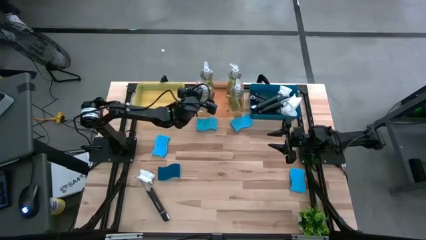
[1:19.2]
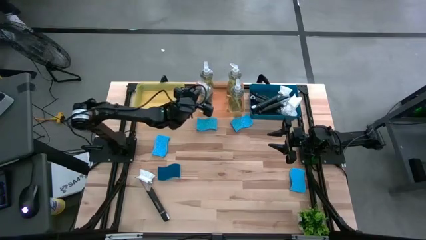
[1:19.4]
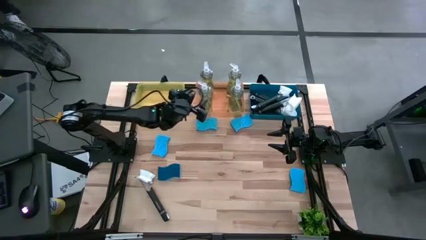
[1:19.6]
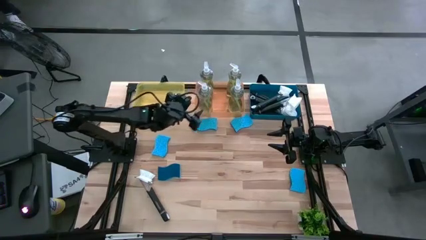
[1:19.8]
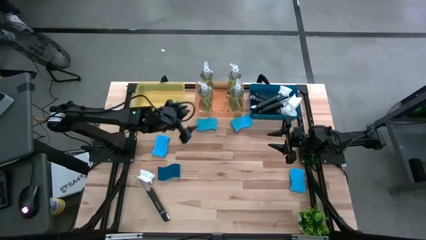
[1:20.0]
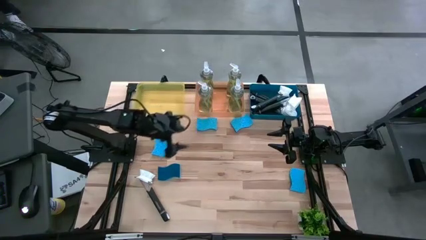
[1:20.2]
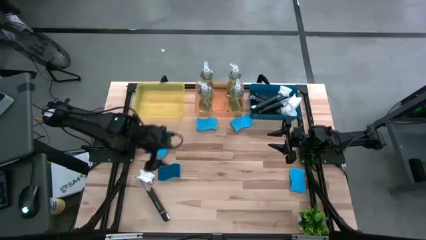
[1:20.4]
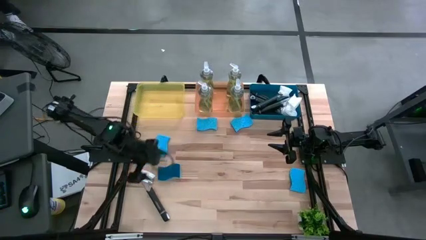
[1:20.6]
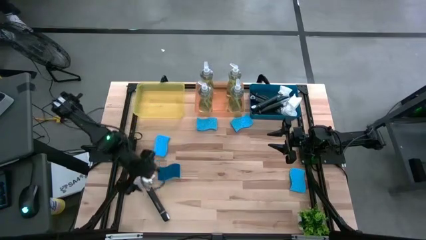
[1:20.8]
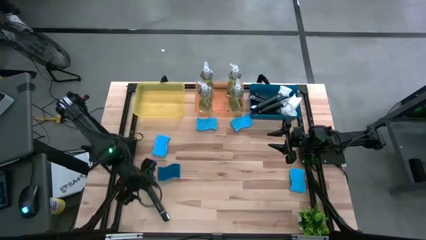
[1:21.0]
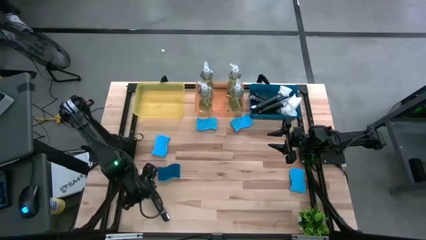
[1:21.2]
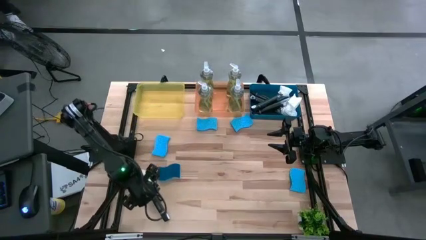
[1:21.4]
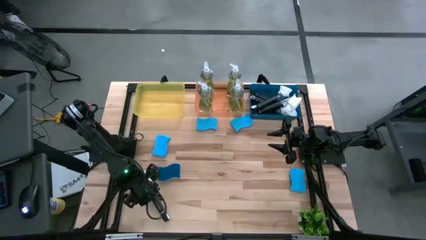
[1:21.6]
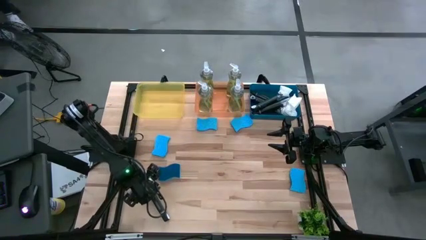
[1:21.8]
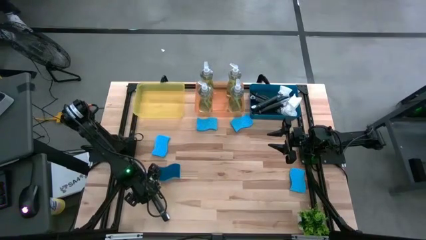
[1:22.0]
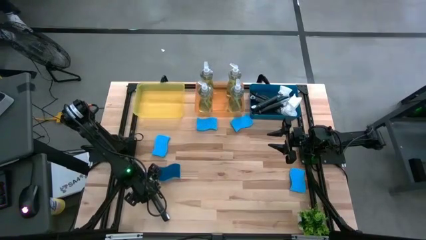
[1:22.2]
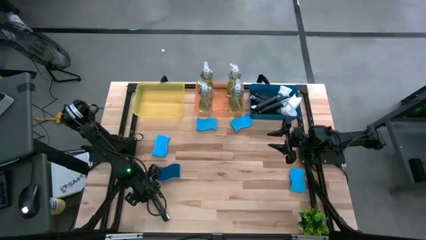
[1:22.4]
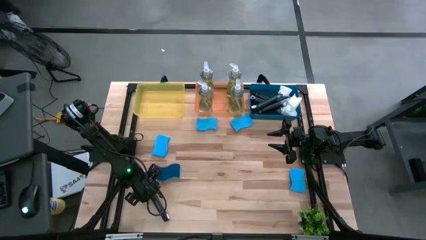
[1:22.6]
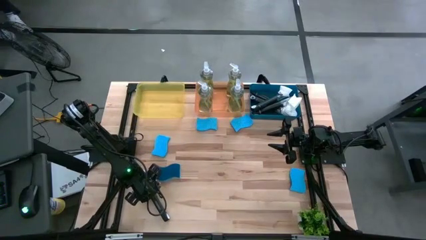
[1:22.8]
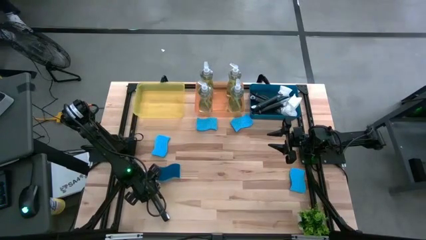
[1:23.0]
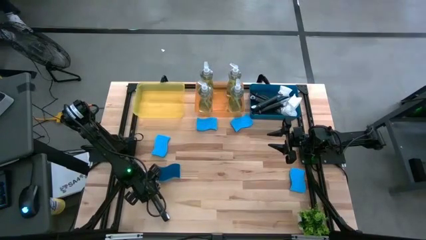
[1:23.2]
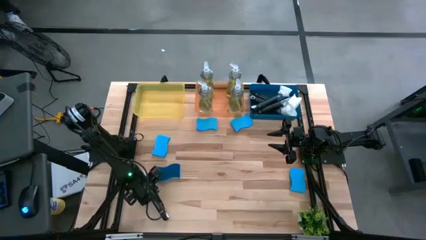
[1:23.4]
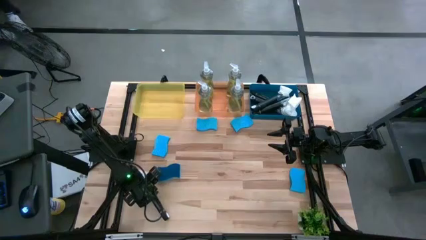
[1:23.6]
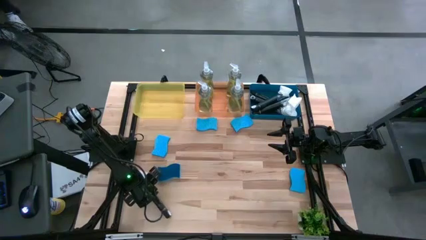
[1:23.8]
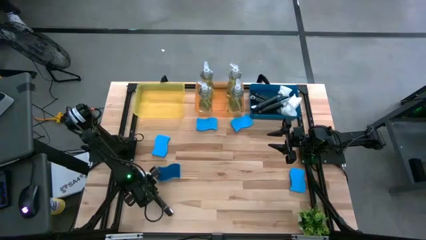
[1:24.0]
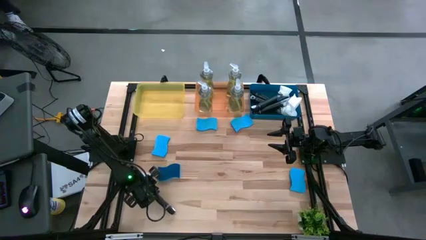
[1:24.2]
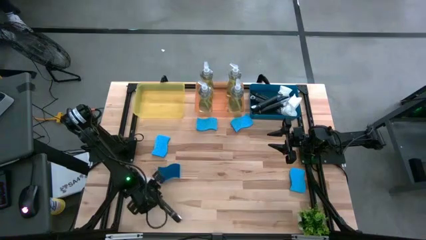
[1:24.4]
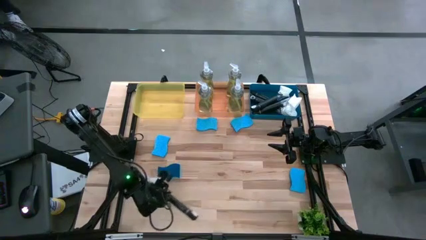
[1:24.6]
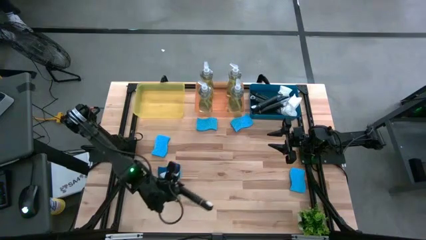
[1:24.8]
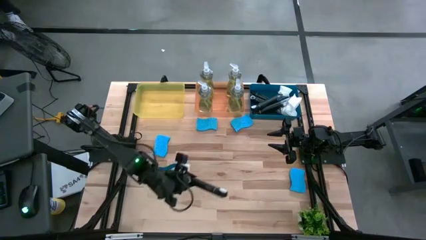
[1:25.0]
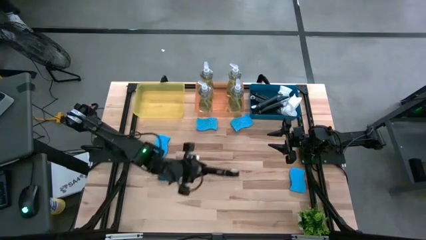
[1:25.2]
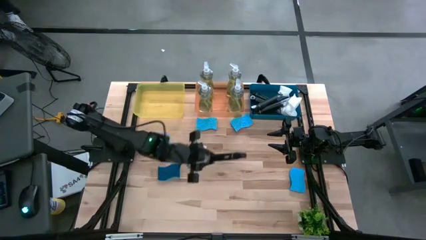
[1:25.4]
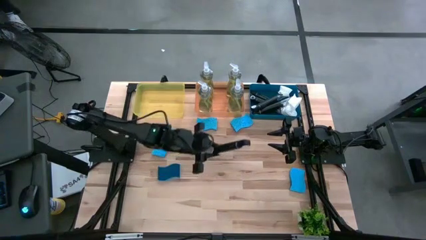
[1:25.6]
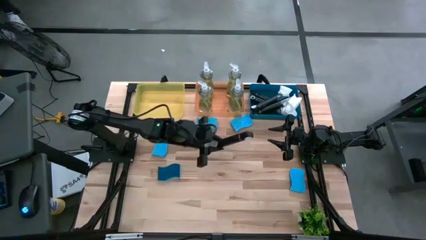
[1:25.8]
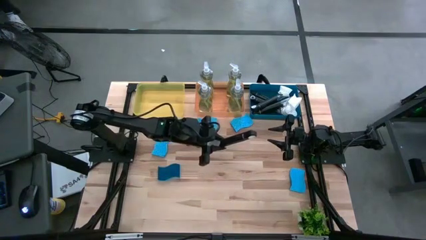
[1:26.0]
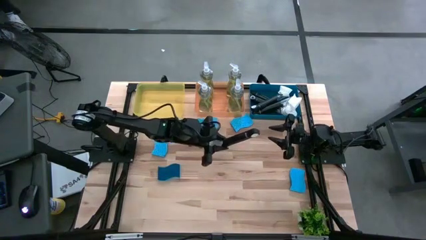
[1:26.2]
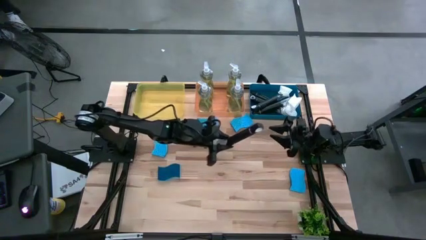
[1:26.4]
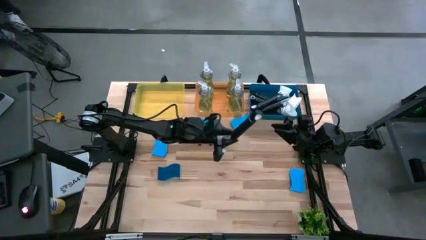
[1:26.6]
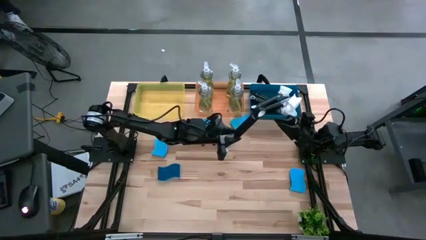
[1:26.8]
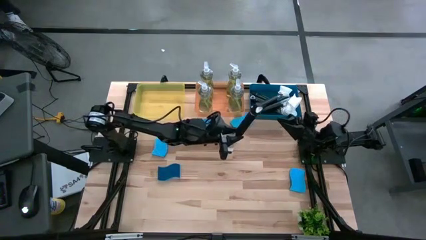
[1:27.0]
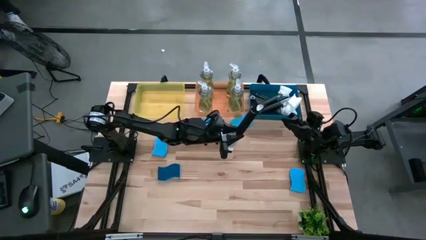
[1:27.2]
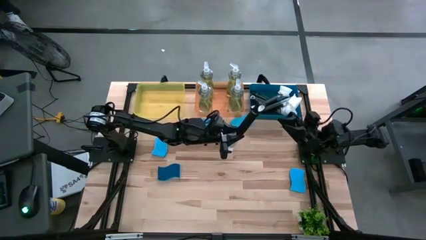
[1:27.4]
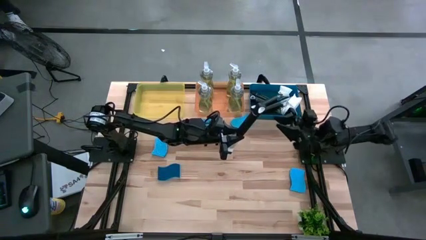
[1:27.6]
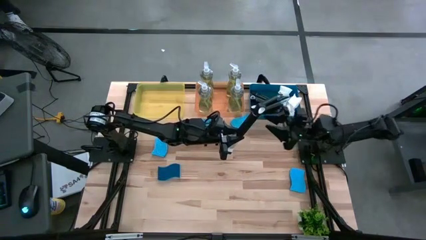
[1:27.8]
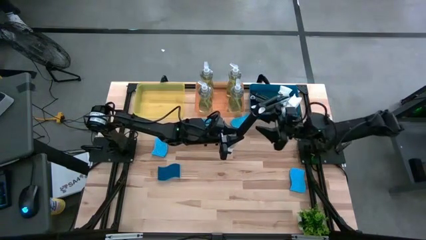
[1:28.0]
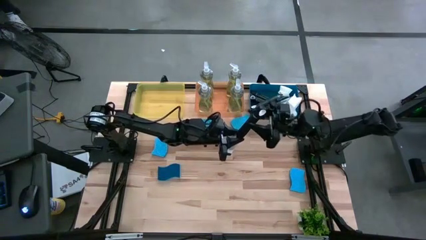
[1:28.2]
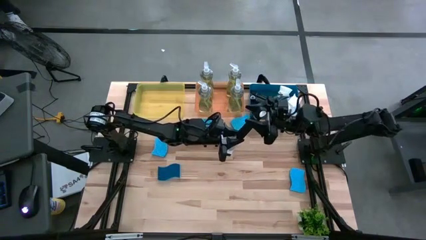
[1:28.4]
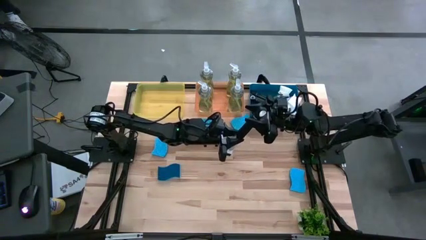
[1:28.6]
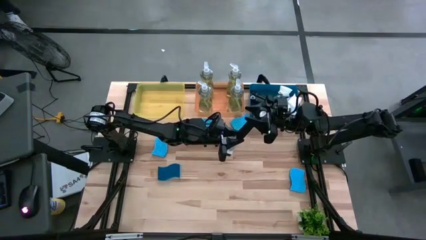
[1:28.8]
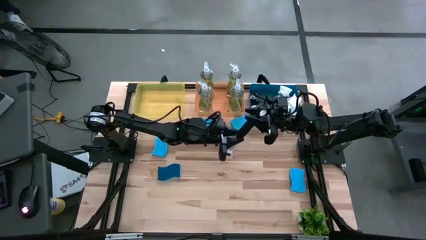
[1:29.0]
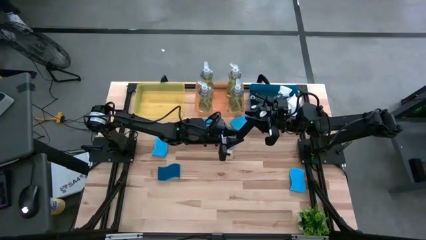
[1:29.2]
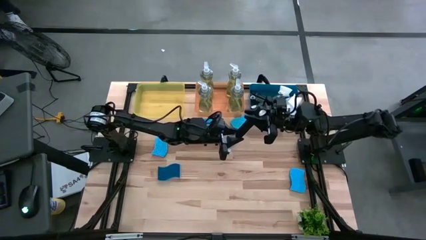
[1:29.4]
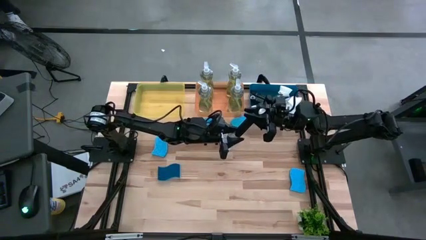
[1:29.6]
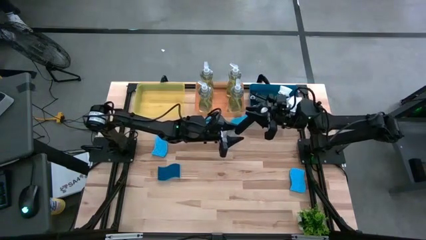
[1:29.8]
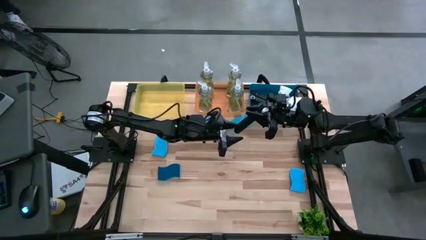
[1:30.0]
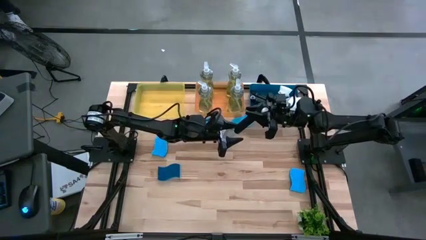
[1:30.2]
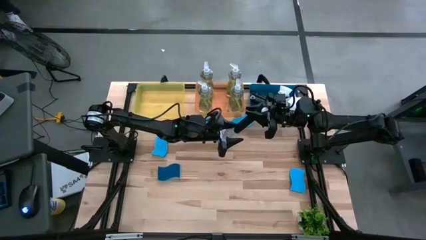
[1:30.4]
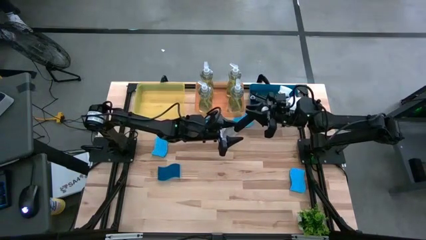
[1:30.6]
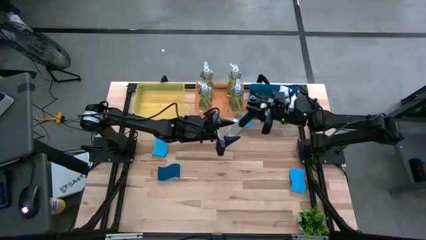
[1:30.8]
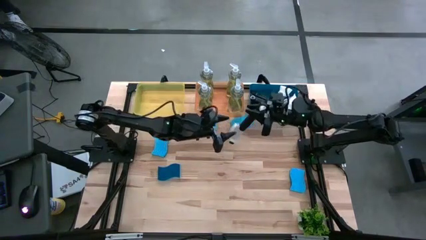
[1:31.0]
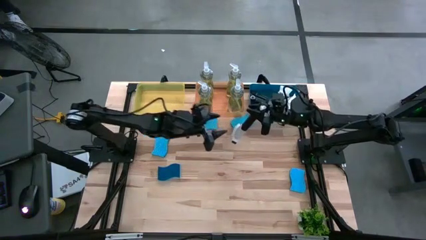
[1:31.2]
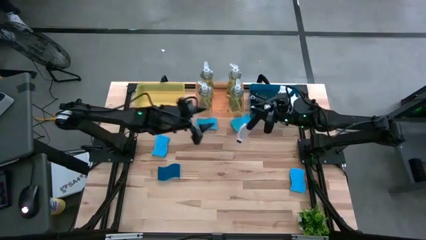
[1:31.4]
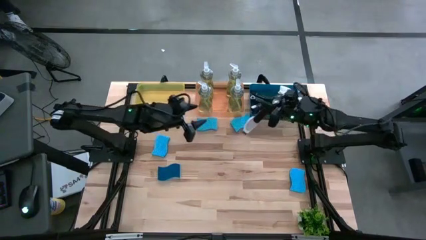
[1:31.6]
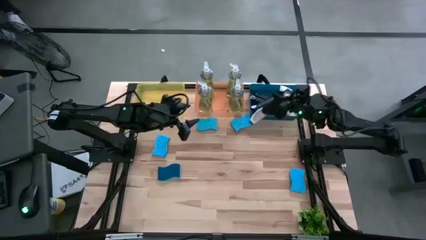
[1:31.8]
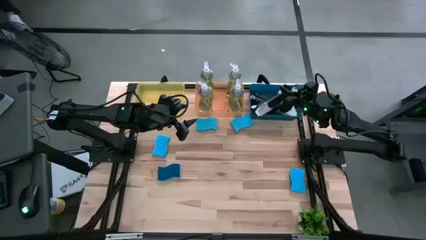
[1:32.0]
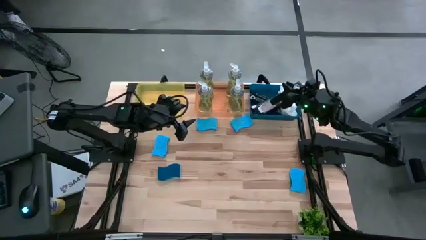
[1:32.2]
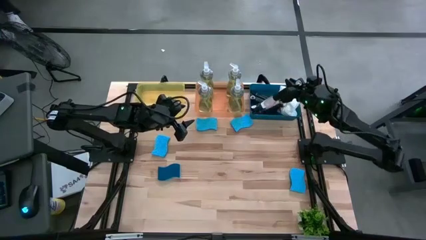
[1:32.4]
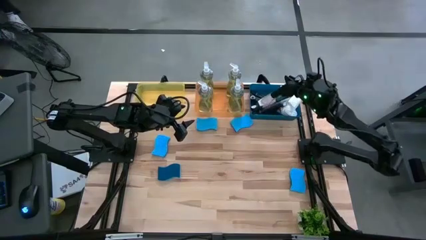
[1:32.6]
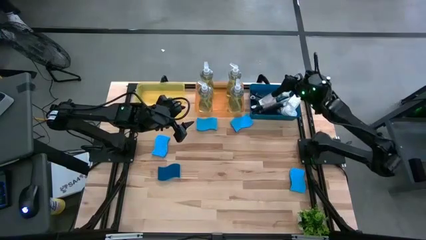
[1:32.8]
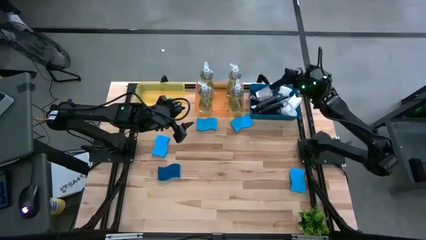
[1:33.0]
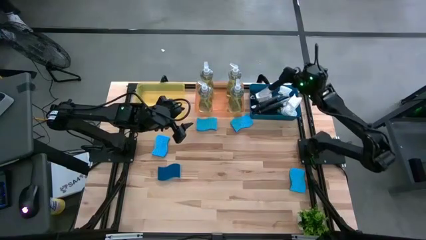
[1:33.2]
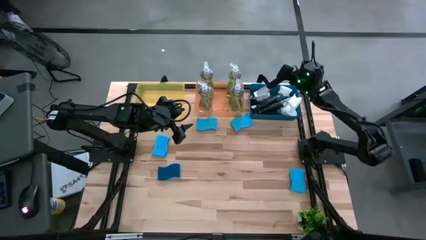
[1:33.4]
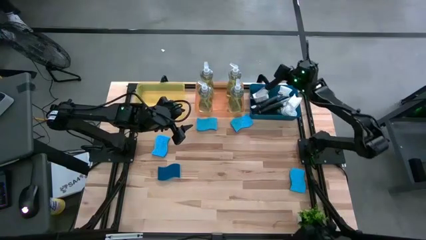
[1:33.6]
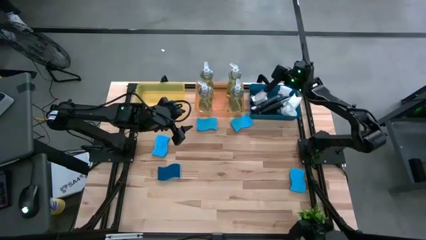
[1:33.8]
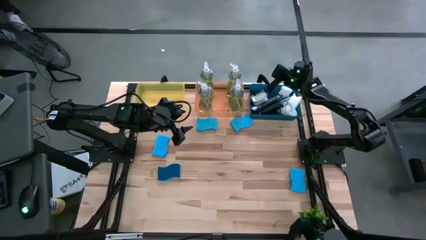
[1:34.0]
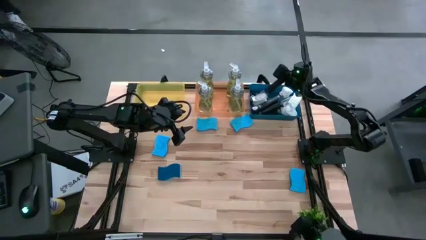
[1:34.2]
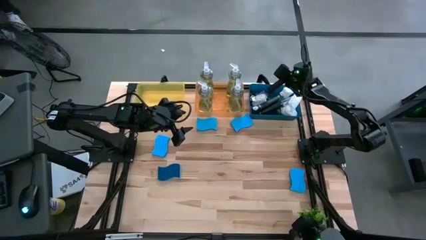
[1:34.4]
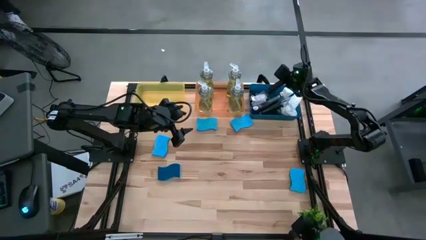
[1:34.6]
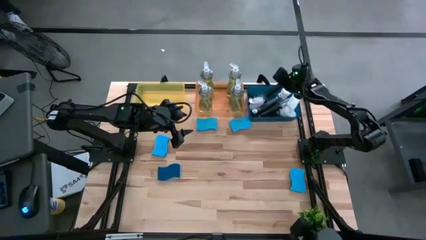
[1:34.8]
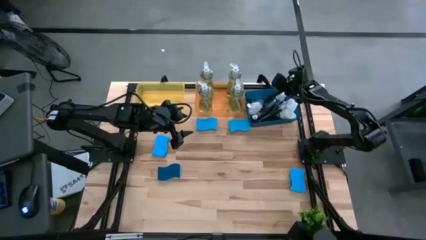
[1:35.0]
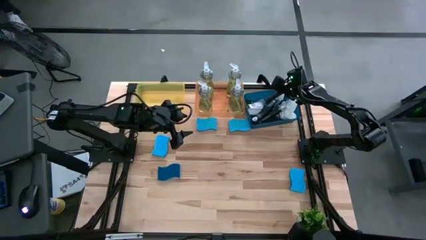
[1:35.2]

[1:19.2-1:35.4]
Task: Pick & Place Kitchen Sink Supplies
Put the black dish brush into the blue bin
